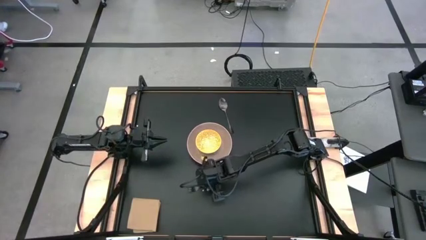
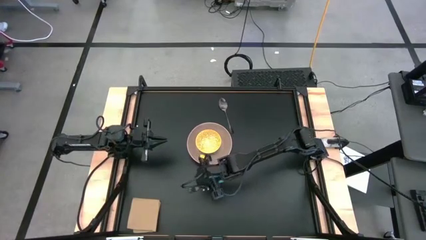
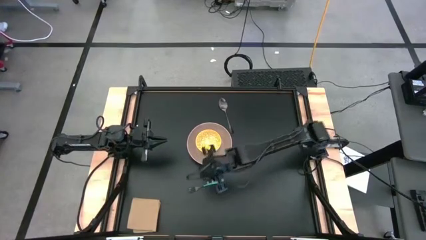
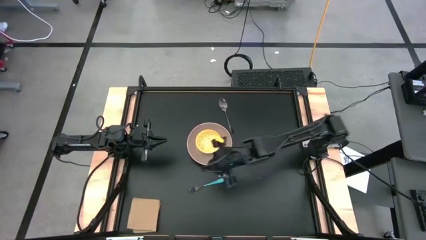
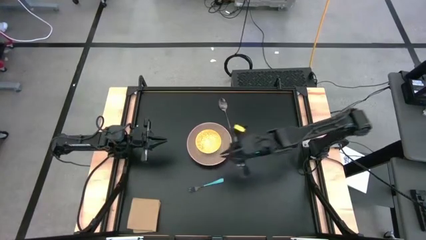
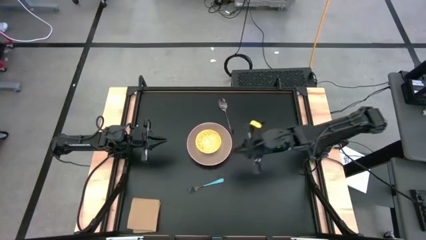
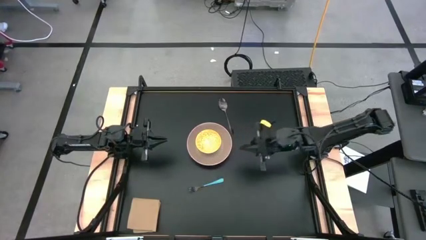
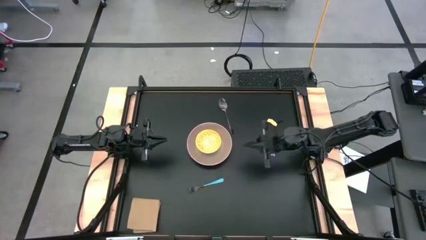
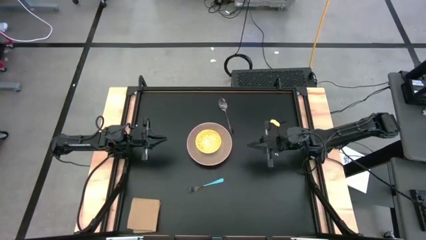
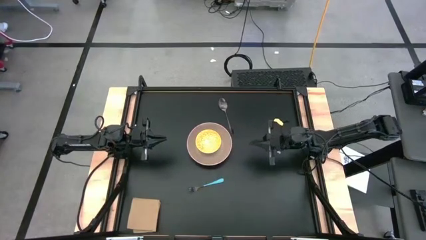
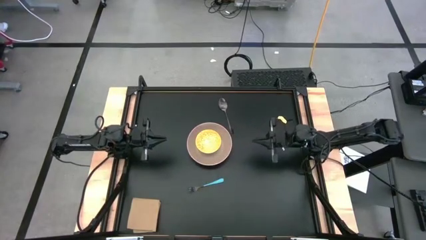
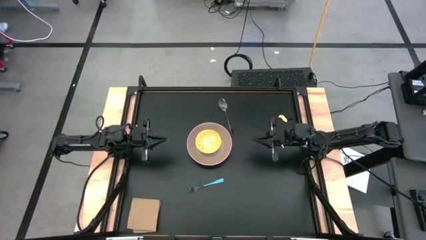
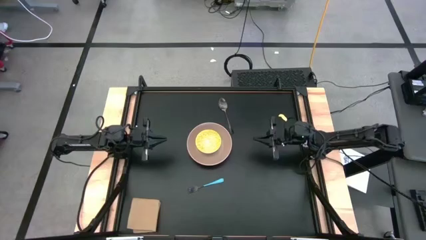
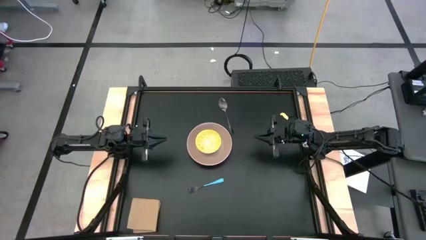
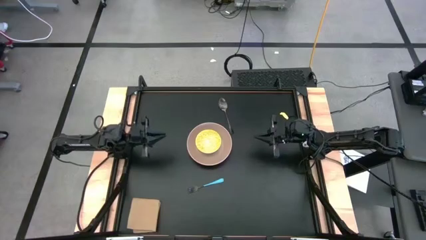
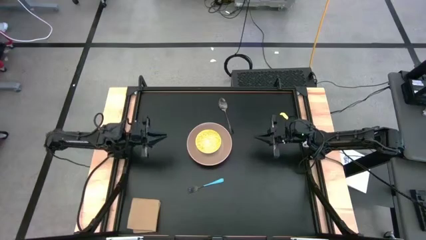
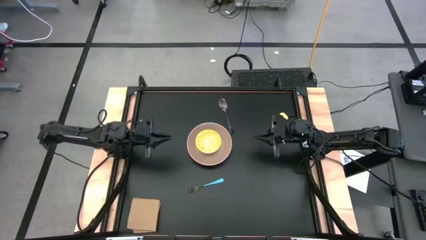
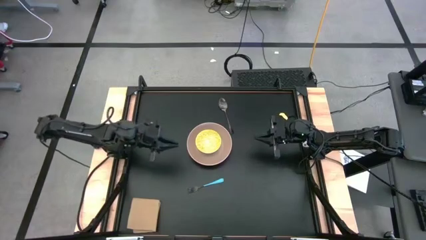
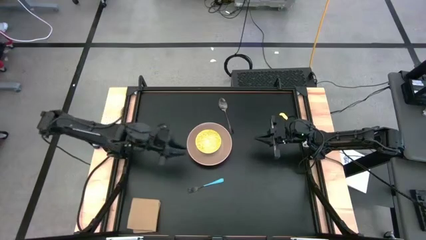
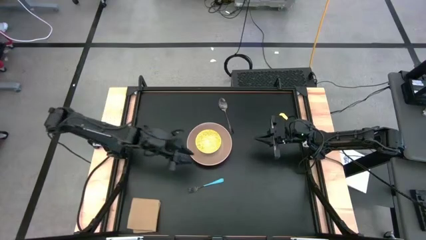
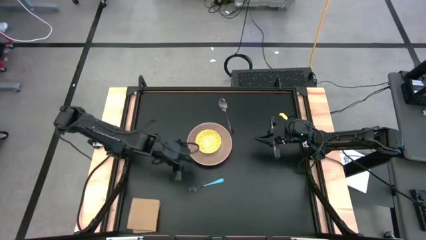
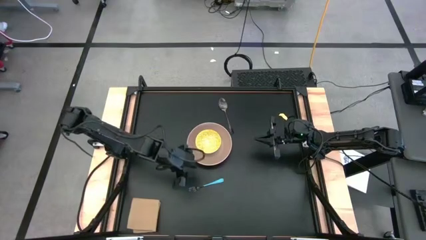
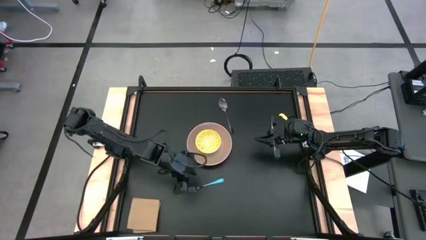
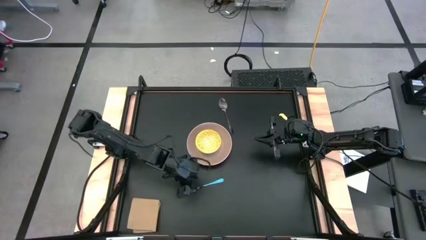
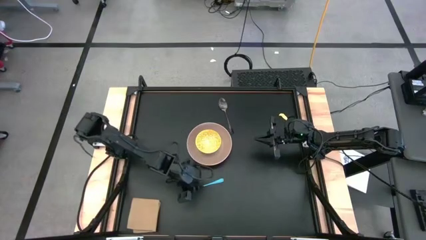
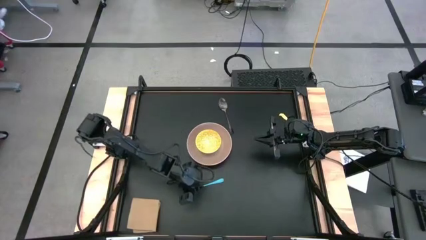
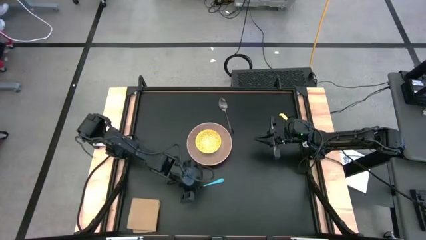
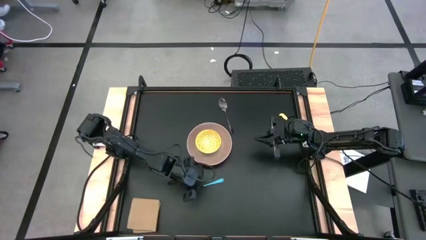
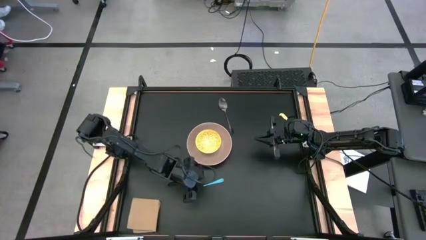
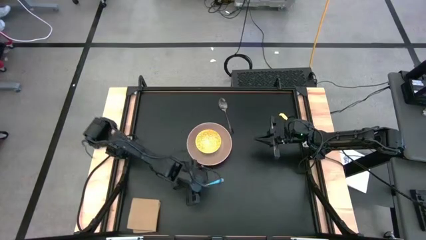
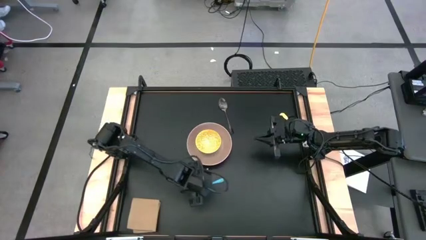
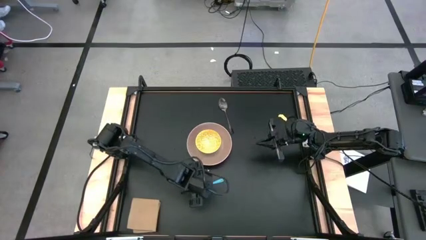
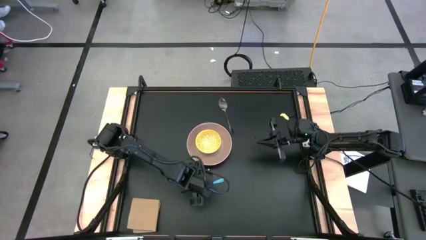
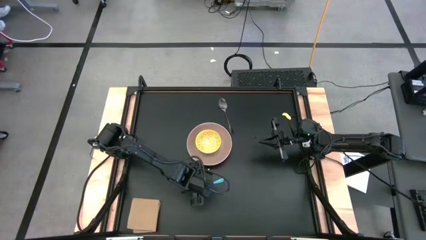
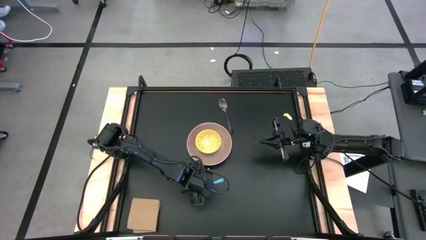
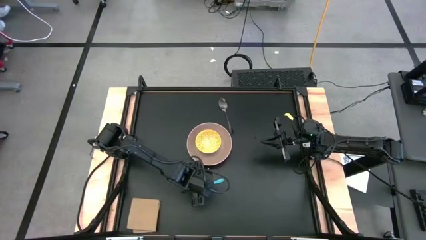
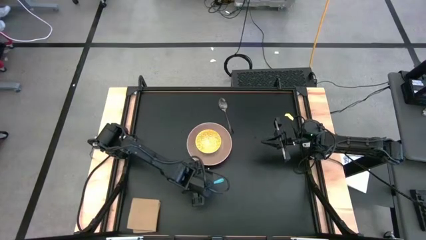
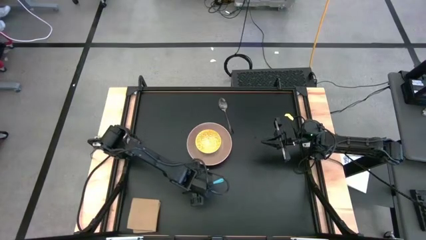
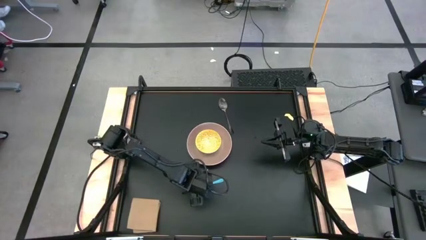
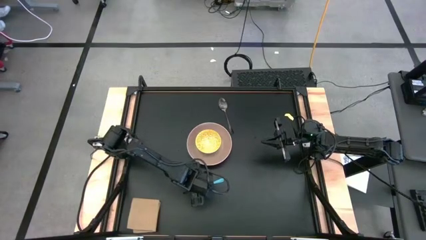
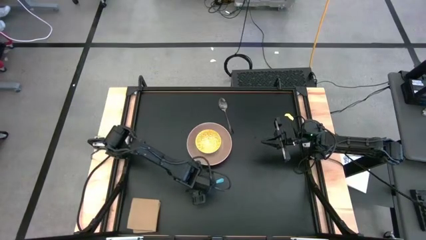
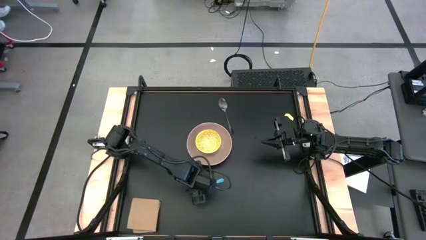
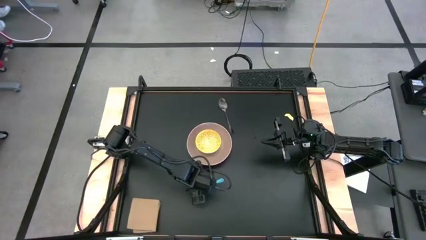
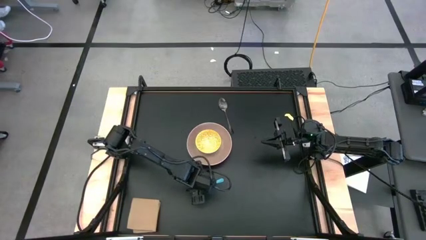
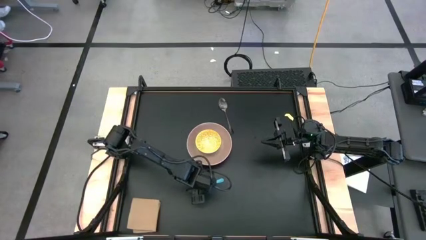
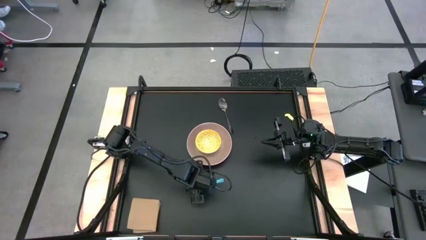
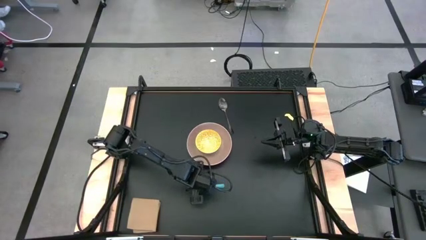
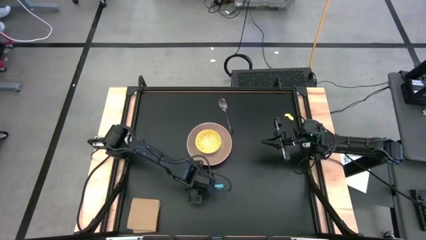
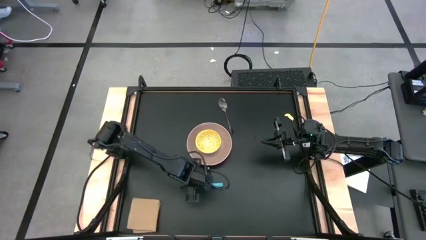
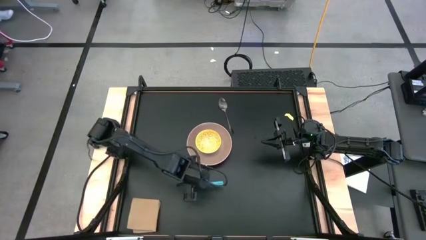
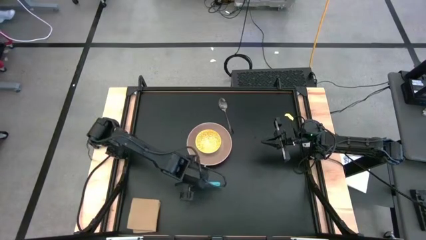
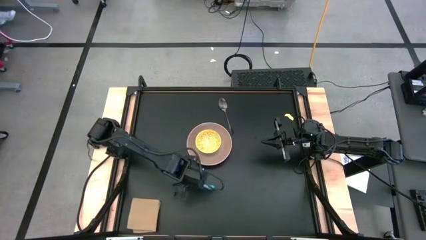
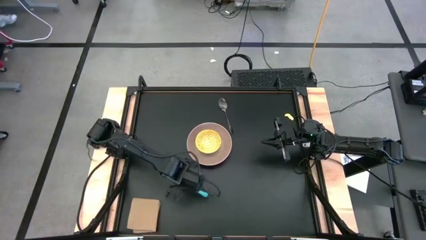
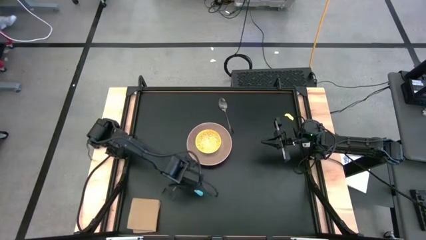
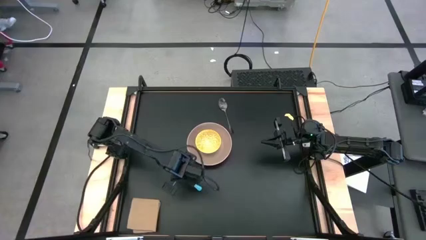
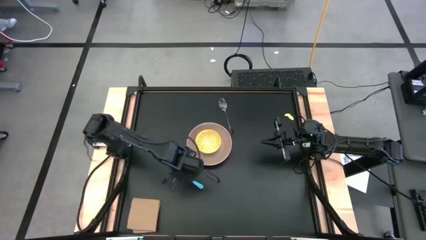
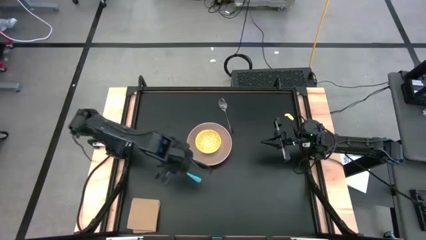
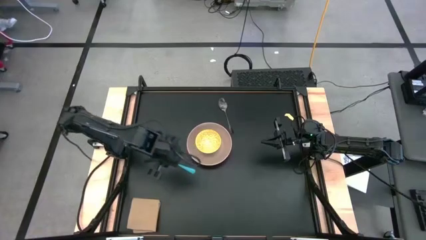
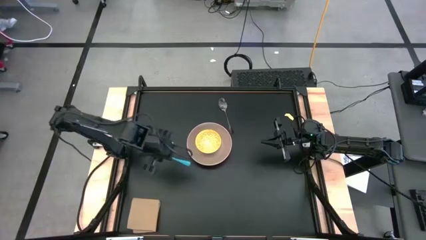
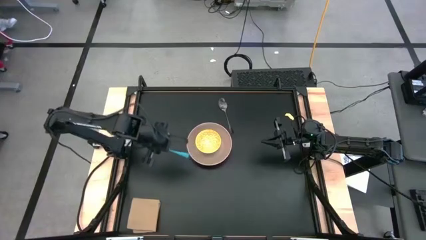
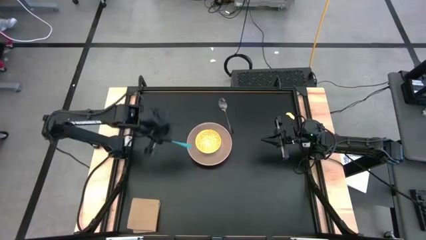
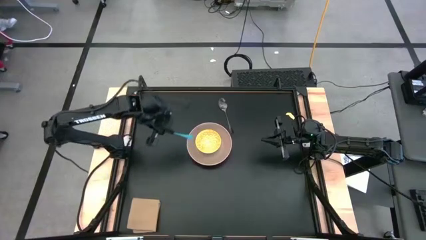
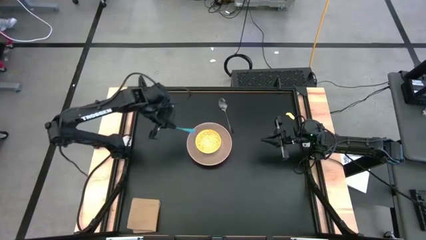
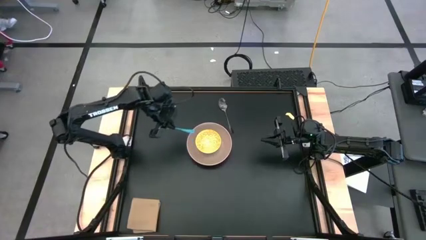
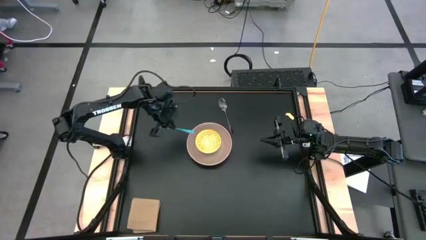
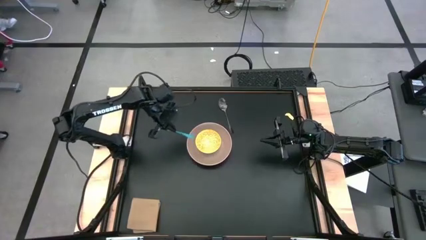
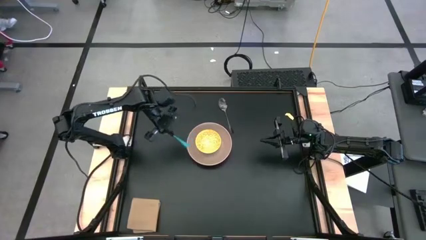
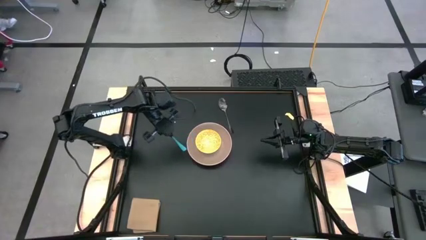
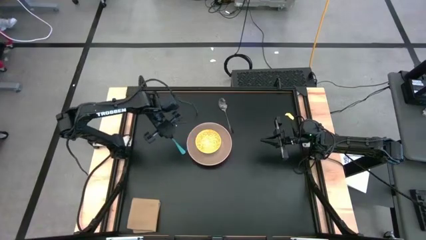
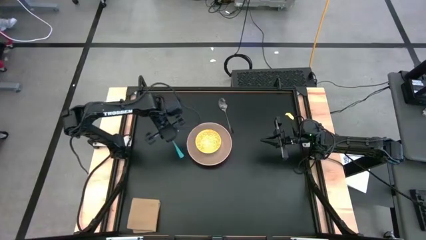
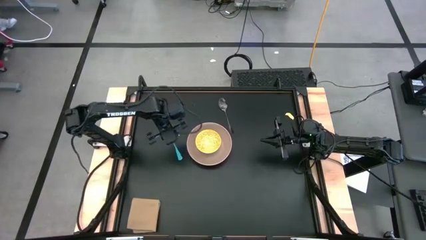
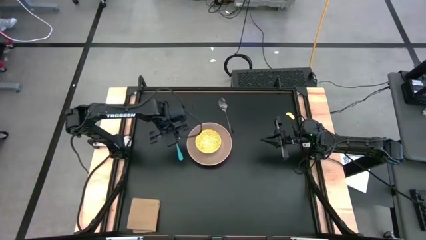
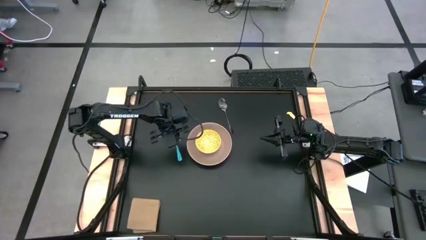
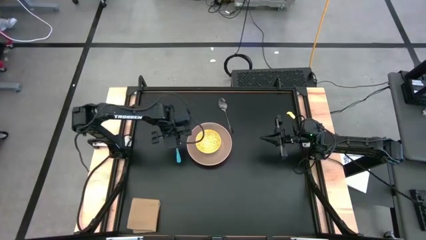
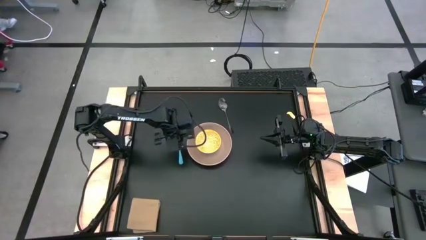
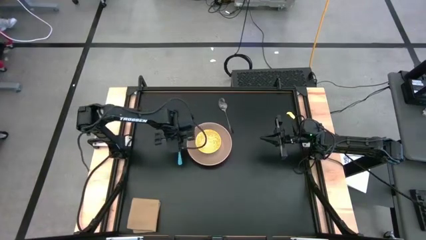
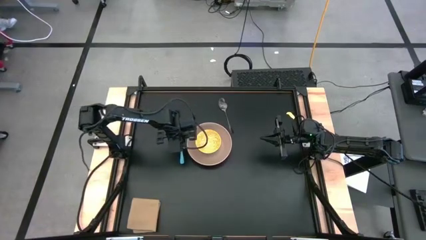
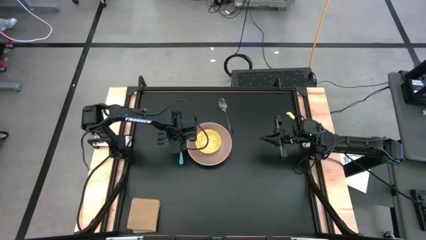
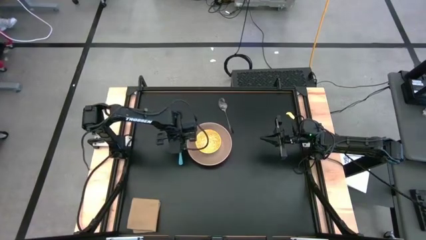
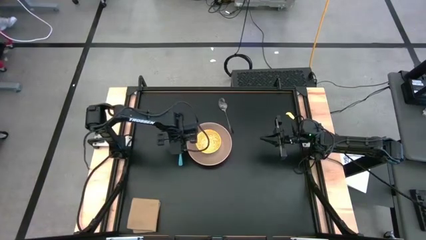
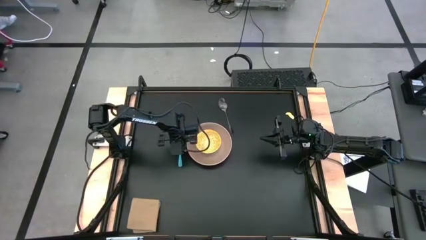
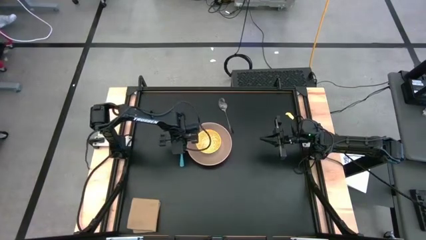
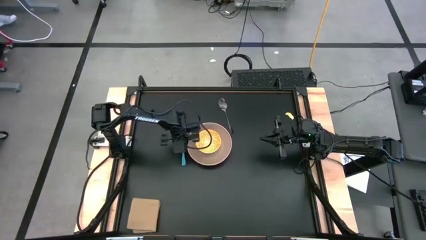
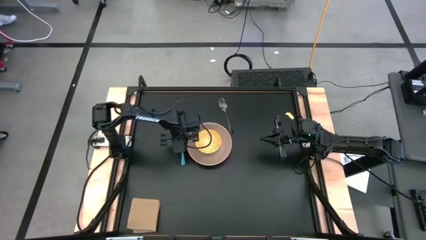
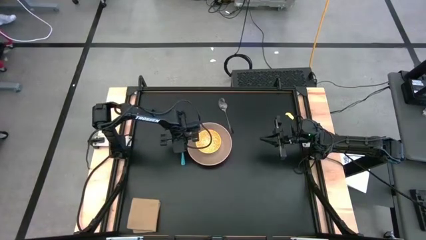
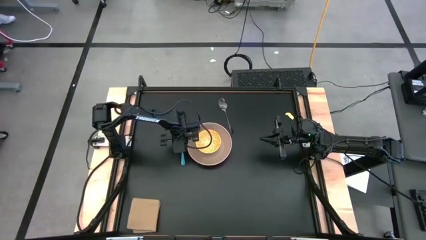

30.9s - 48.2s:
Task: Set table place
Put the blue fork on the left side of the plate
